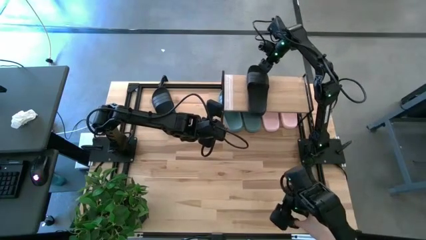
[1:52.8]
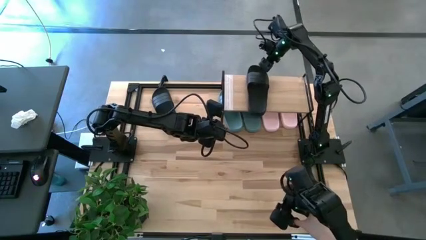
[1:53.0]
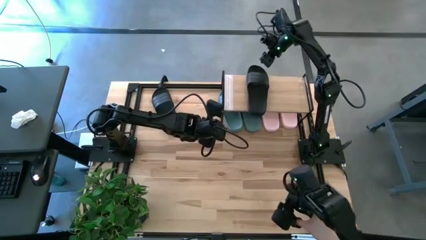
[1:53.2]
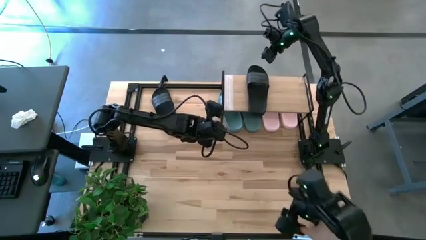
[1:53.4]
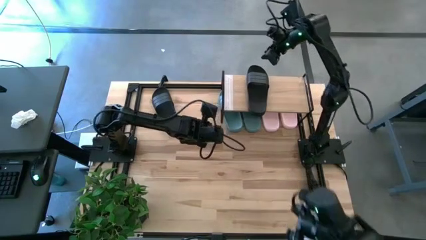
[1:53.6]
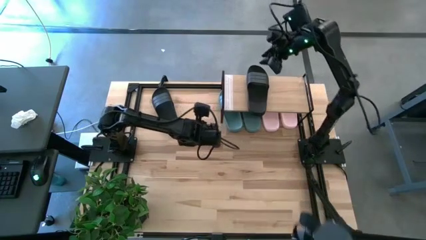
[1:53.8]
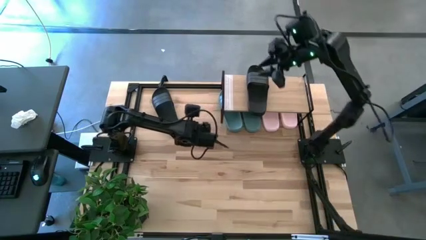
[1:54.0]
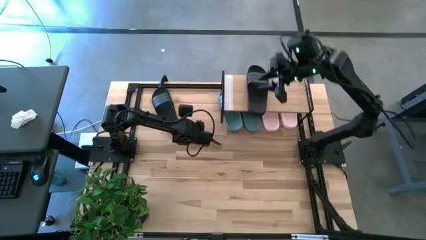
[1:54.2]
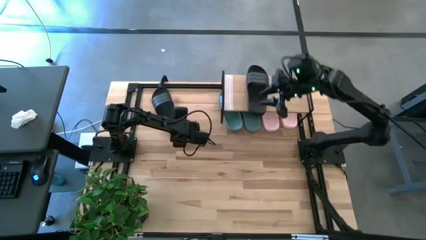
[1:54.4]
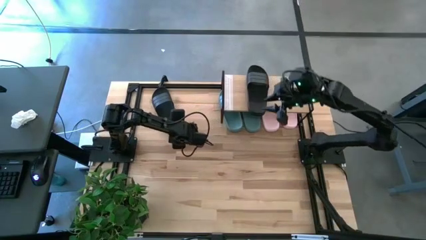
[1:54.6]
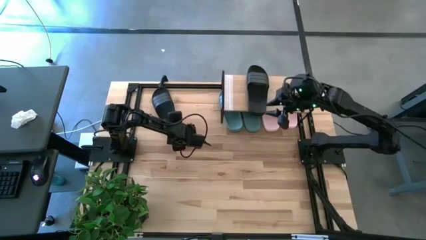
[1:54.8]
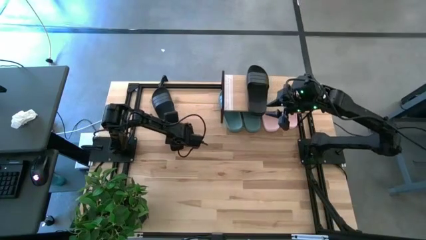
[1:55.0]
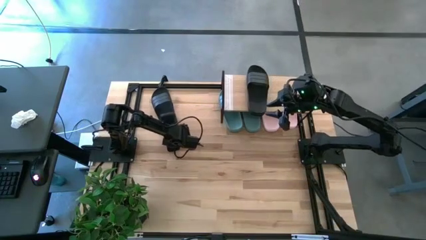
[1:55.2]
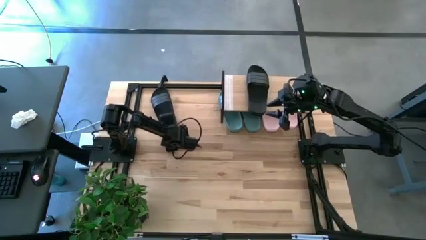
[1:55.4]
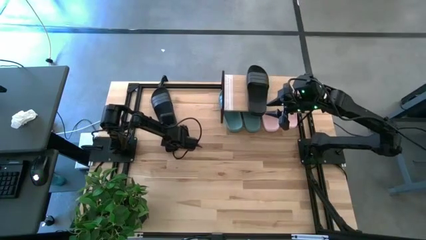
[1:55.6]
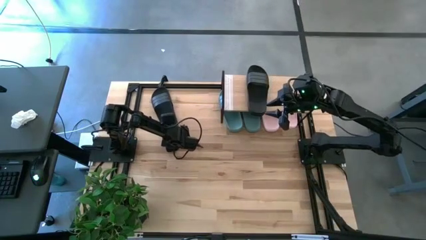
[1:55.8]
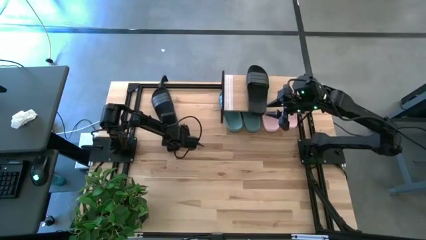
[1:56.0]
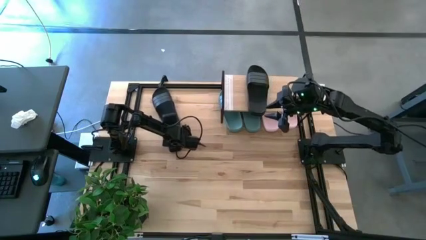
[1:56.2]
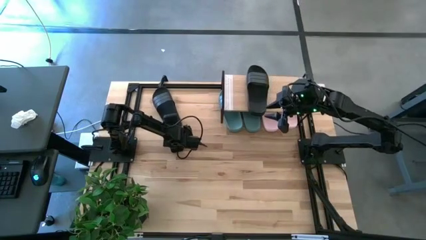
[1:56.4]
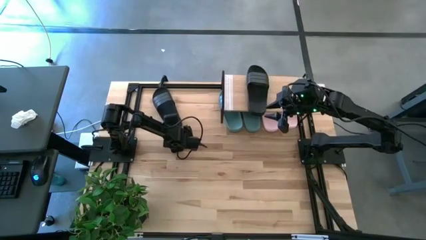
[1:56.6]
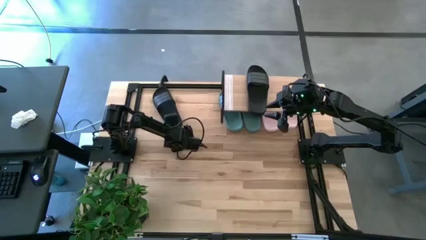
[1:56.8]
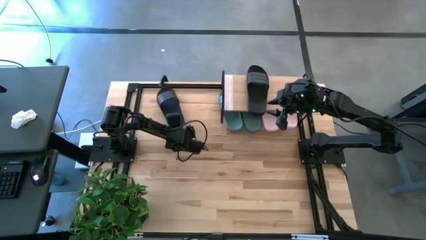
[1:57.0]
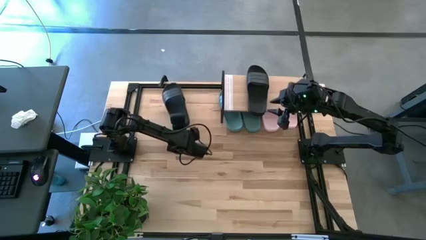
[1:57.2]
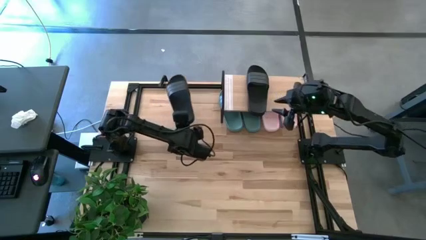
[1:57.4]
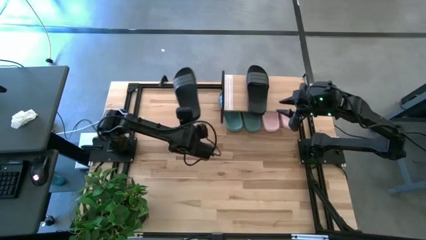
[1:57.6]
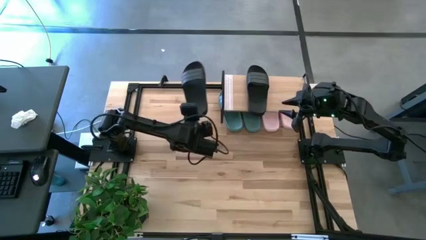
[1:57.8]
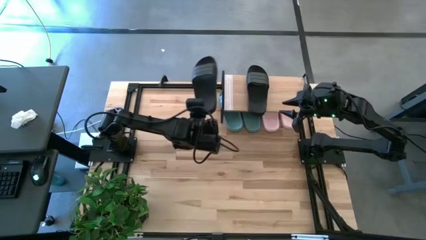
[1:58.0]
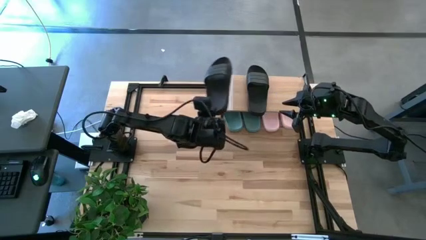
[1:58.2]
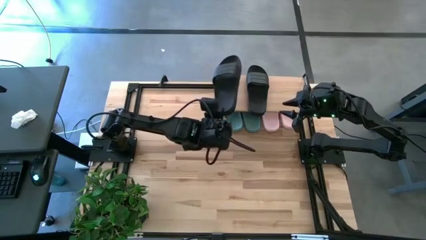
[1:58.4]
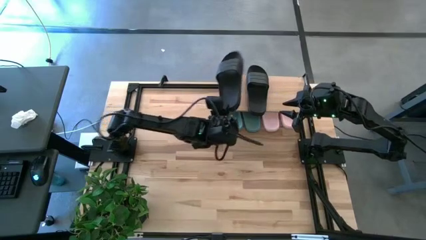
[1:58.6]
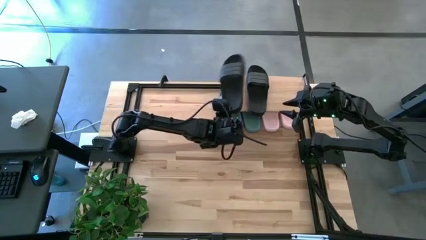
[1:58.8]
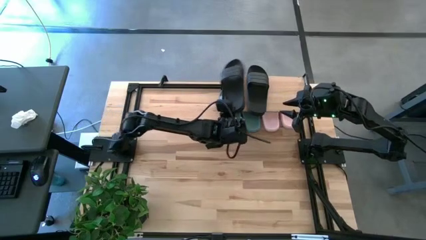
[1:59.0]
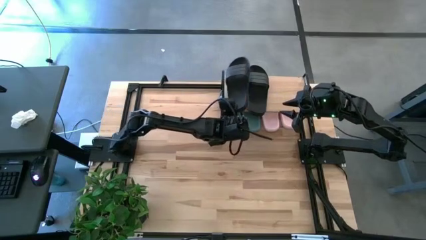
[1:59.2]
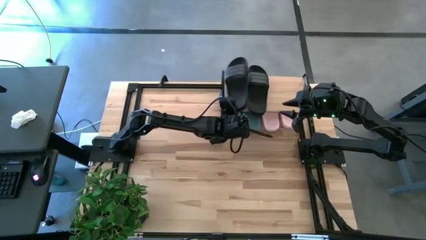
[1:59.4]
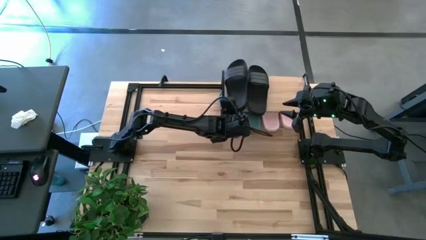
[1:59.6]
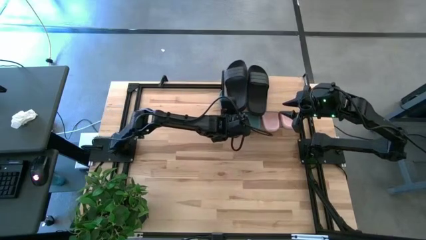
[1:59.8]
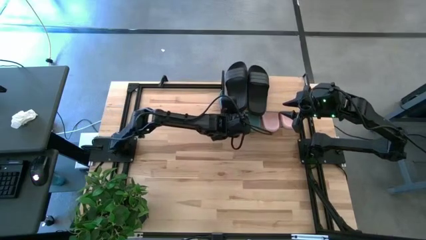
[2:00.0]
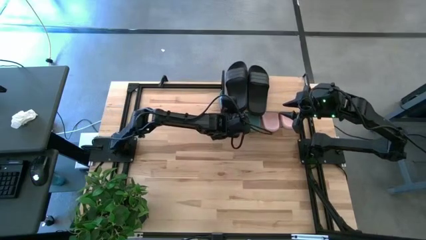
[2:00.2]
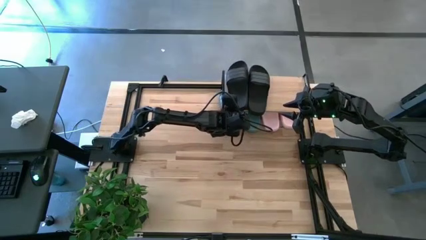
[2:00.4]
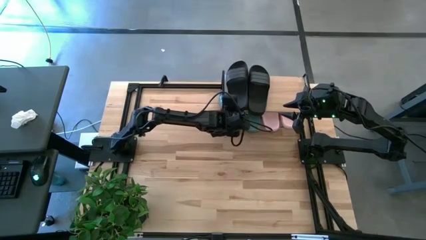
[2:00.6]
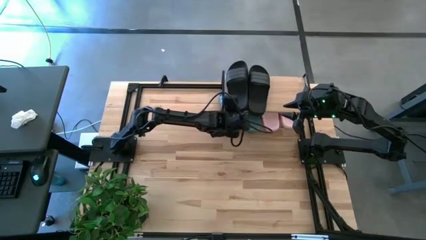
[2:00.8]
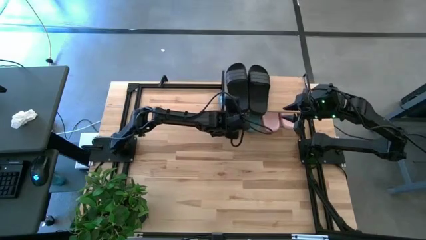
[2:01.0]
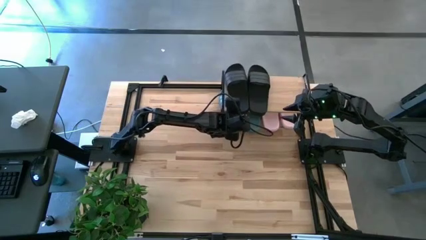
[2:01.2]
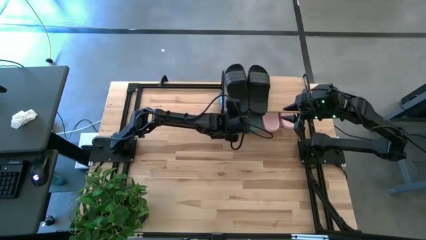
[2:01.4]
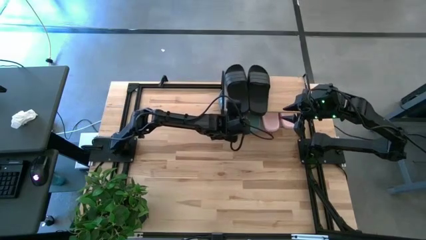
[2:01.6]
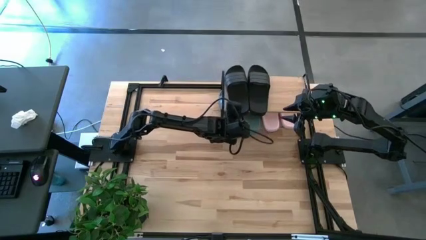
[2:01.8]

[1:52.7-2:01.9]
Task: Pick and place slides into the shelf
Put the left black slides on the shelf

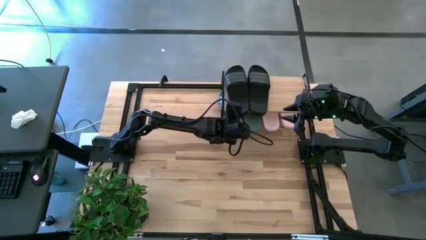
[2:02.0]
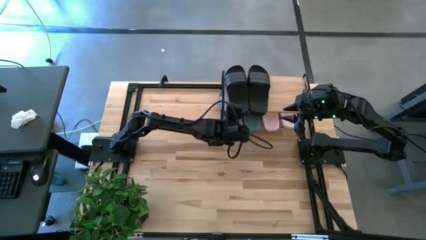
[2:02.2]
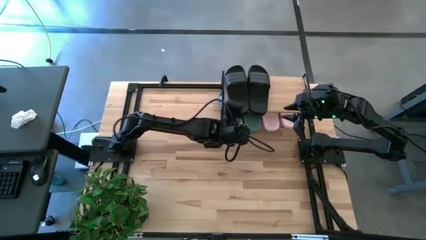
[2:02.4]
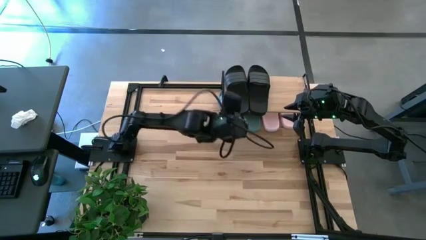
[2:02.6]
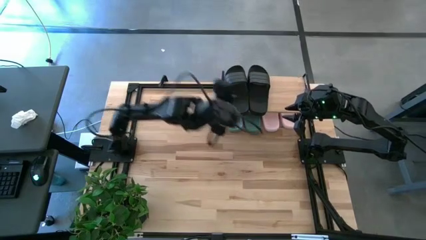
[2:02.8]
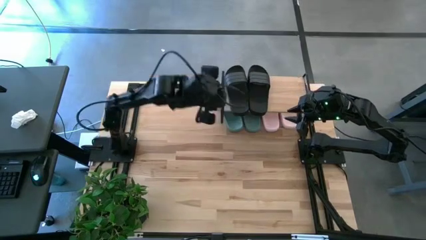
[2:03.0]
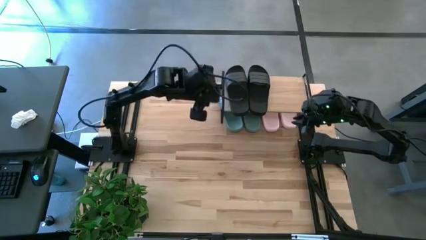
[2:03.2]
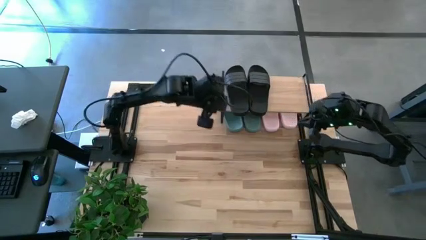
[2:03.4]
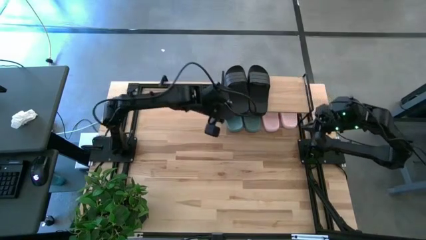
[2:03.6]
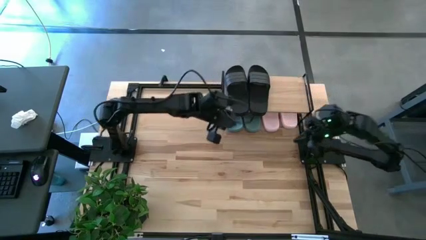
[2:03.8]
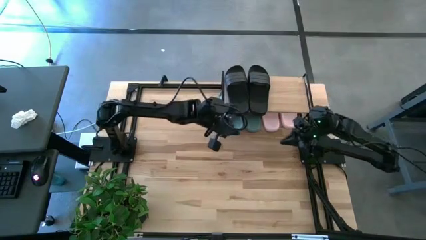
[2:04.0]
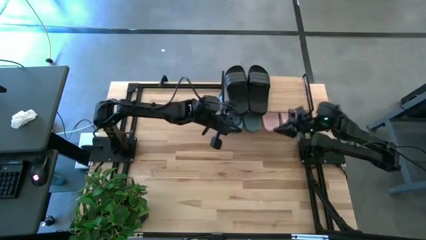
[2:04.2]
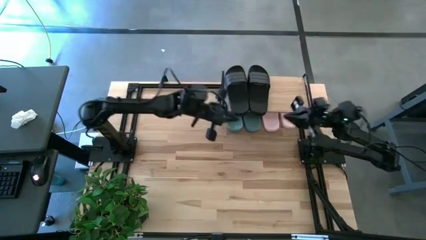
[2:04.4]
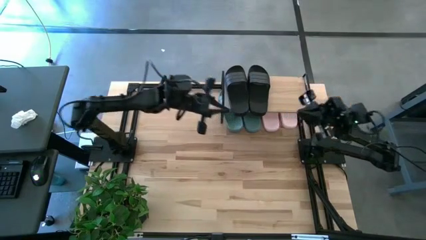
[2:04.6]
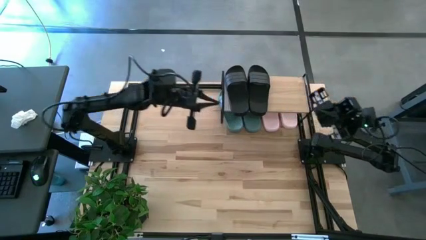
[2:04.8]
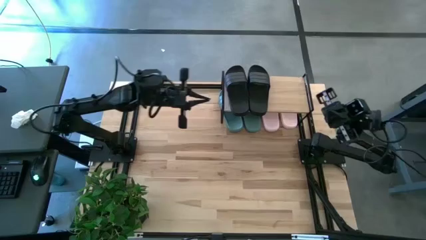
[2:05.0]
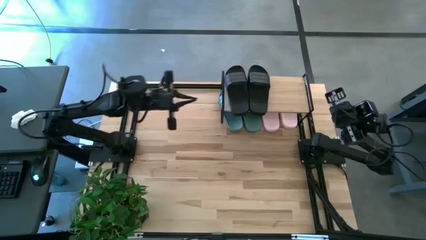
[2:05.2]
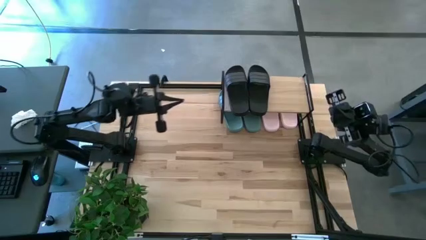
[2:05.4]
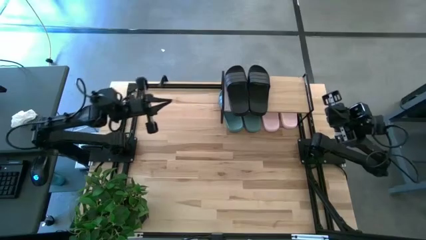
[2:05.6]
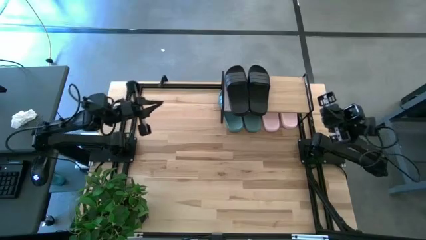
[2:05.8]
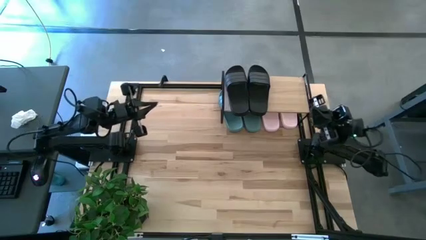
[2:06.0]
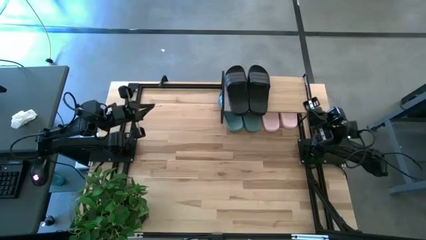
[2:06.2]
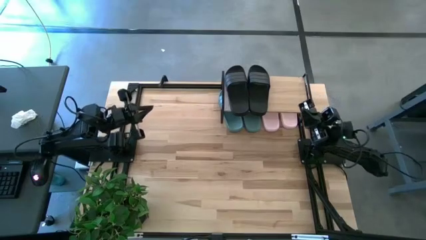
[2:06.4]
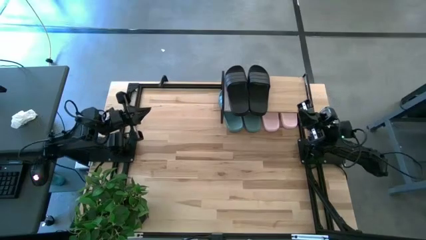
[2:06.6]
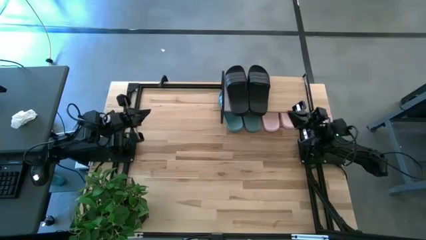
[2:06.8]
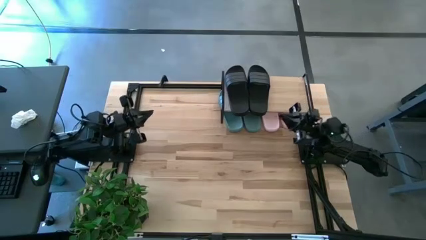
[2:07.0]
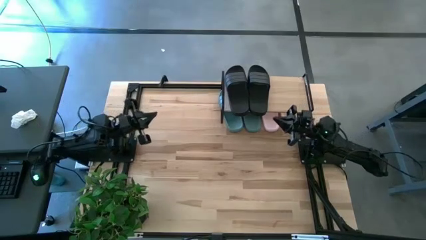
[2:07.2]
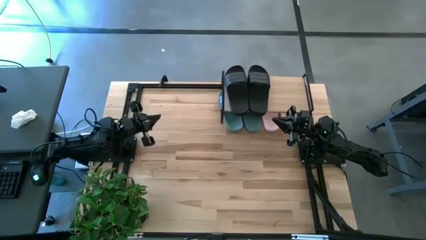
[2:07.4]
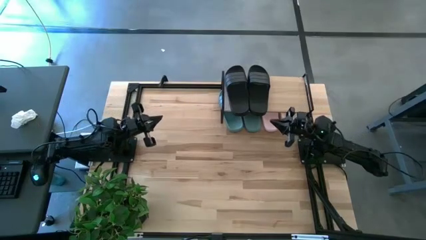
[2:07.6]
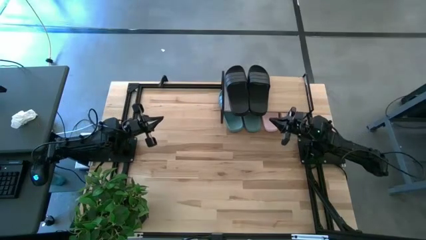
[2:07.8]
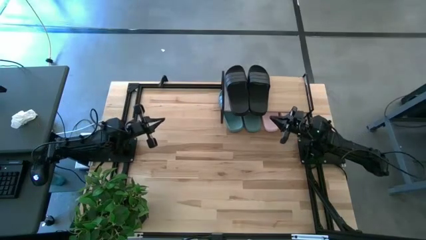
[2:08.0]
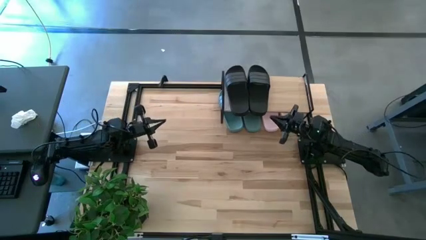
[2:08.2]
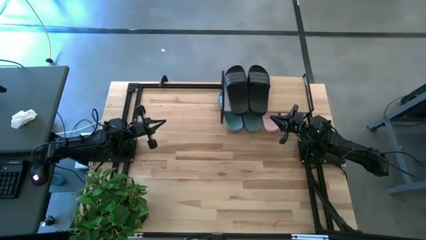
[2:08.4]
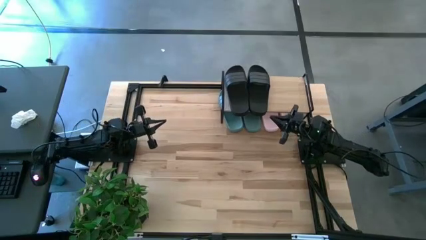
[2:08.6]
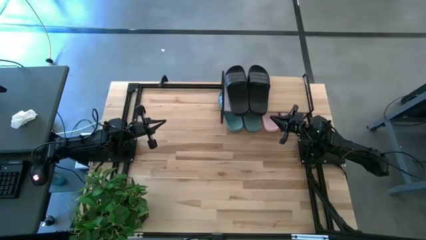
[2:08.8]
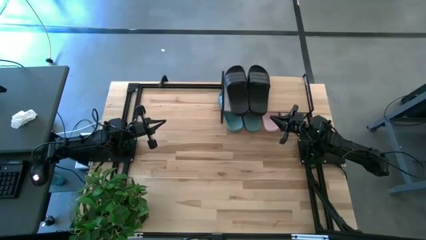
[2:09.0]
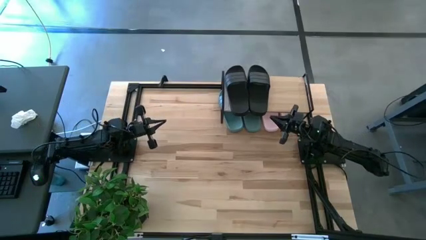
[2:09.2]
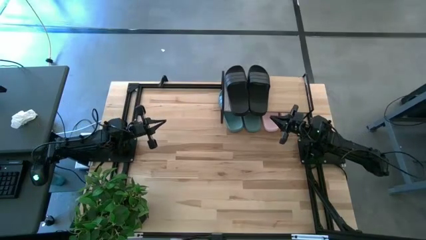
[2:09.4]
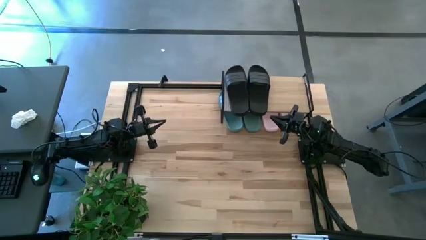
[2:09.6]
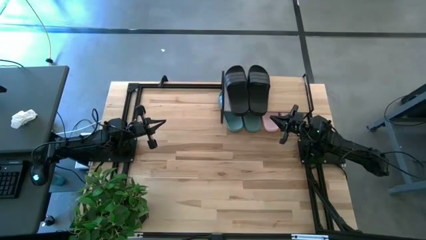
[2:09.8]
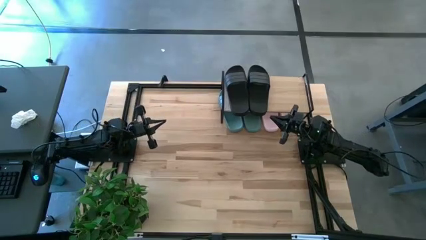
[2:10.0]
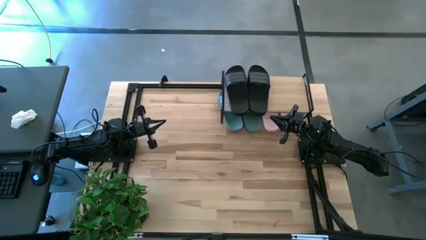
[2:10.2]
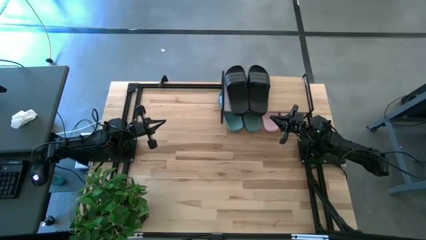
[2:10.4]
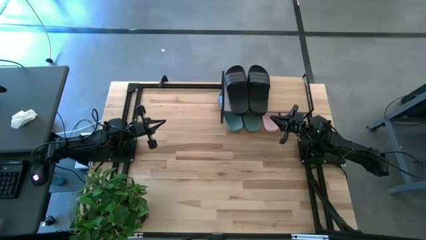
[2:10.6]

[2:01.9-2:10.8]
Return to Home Position
